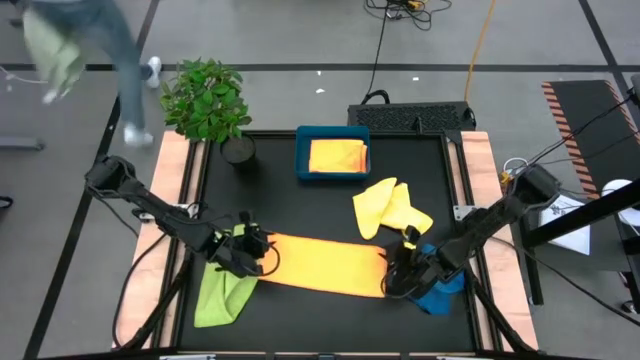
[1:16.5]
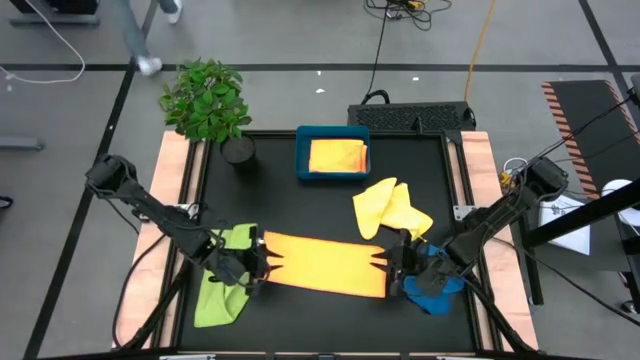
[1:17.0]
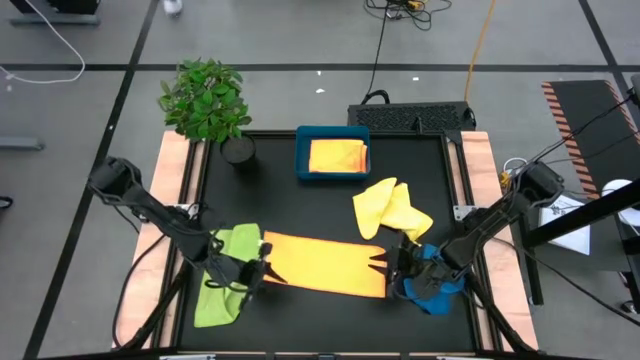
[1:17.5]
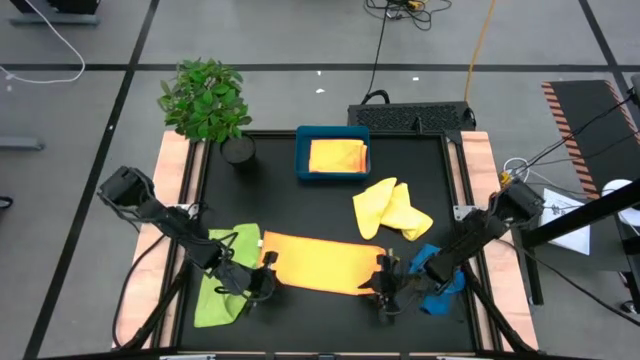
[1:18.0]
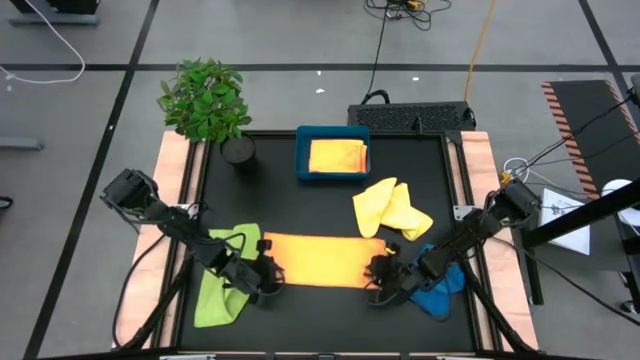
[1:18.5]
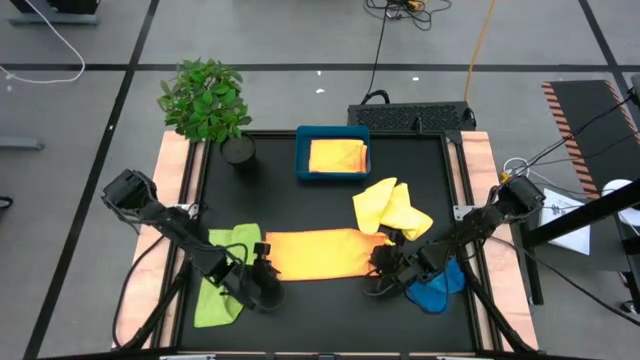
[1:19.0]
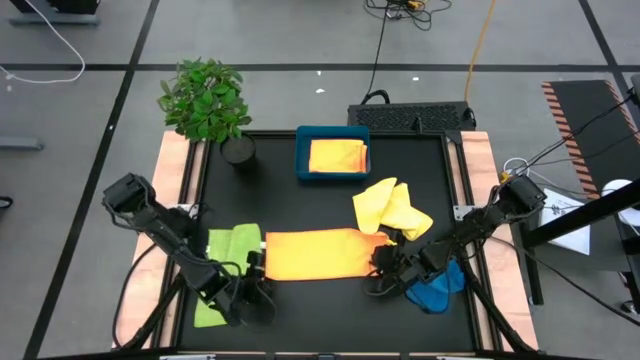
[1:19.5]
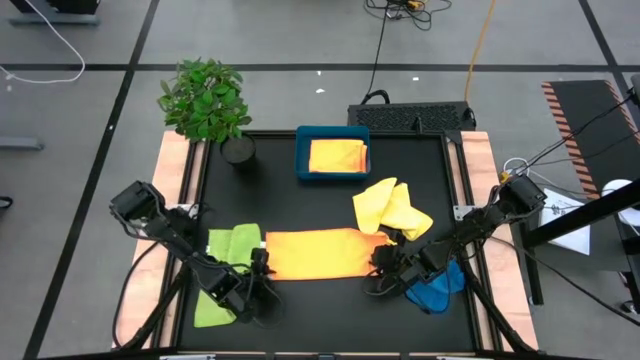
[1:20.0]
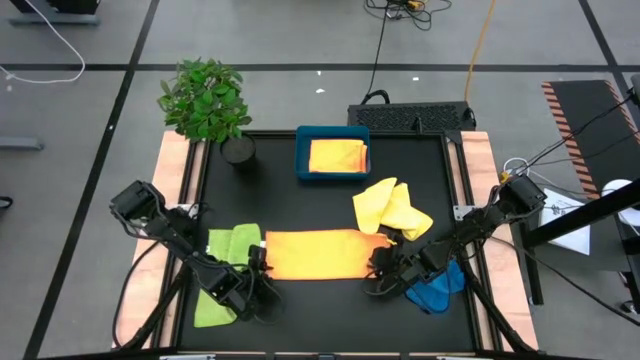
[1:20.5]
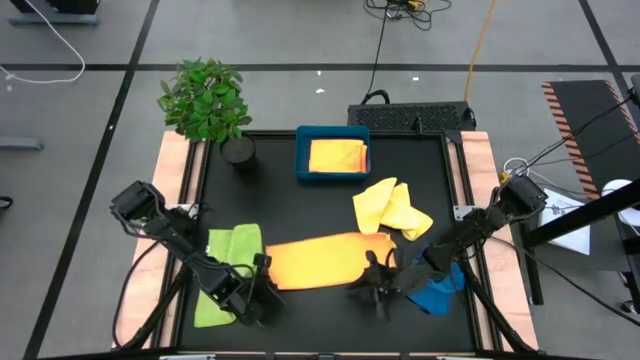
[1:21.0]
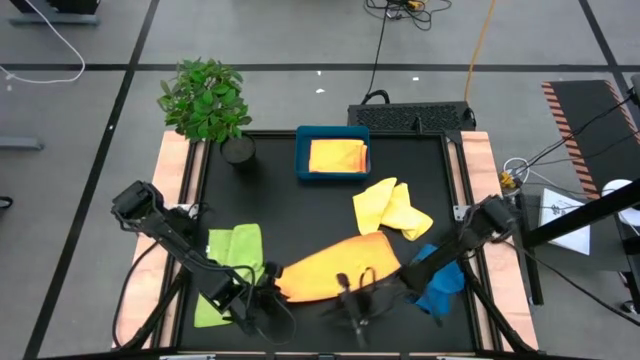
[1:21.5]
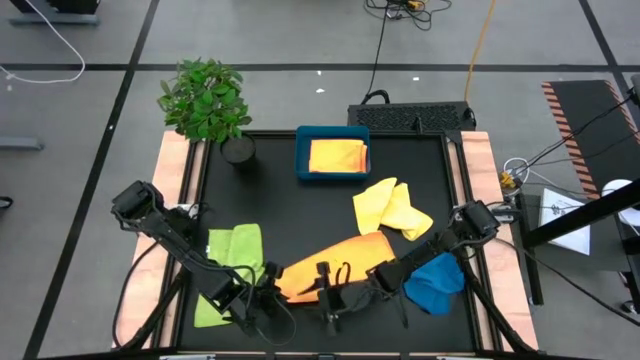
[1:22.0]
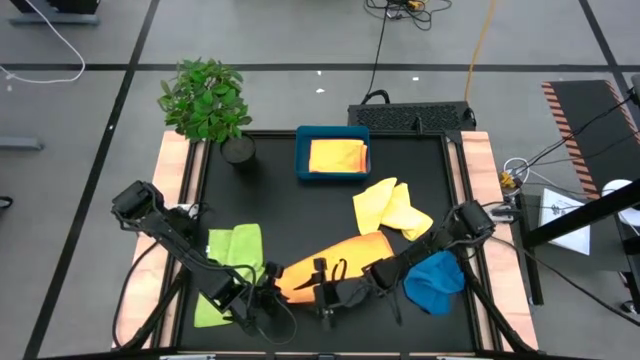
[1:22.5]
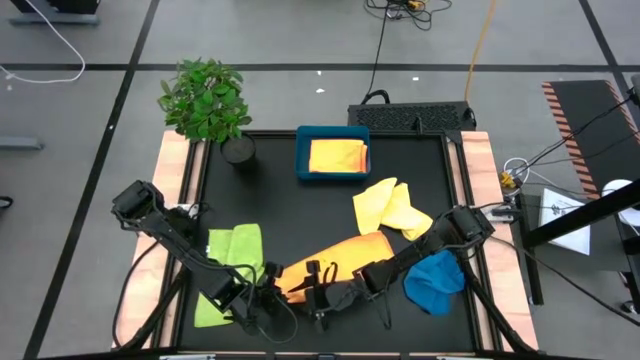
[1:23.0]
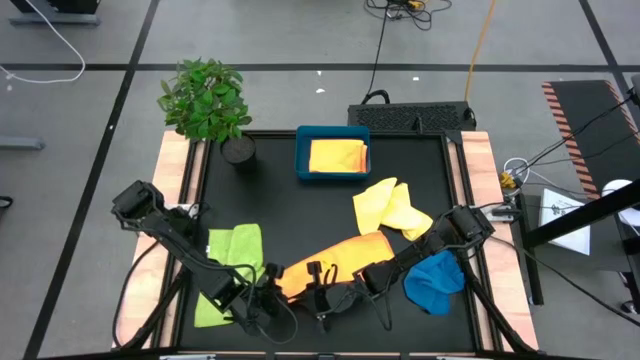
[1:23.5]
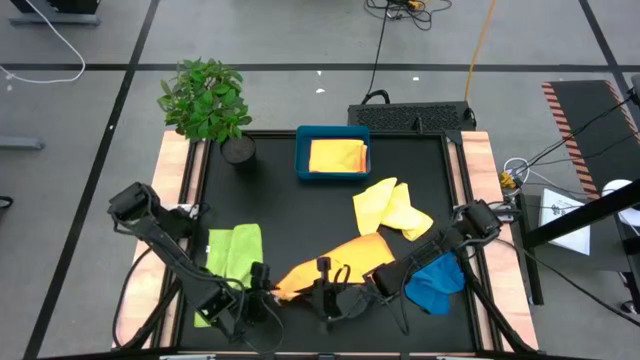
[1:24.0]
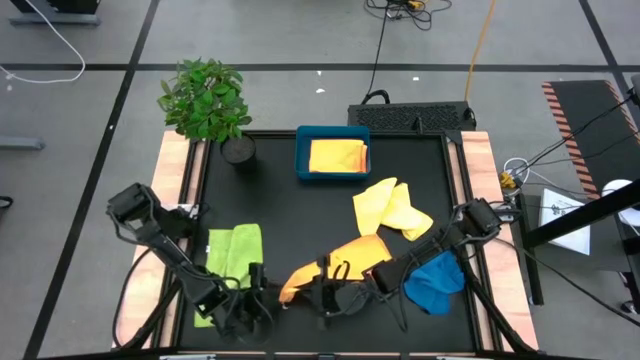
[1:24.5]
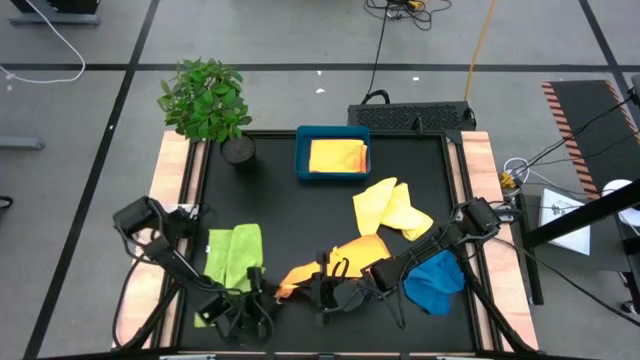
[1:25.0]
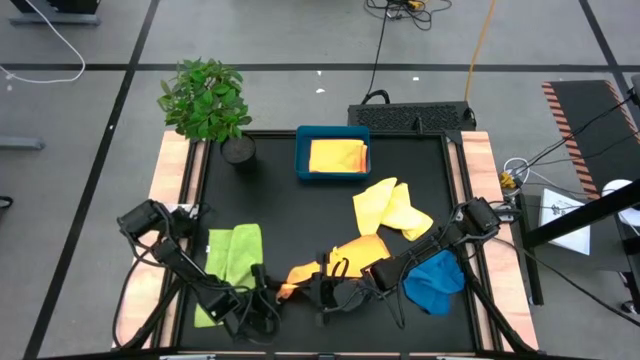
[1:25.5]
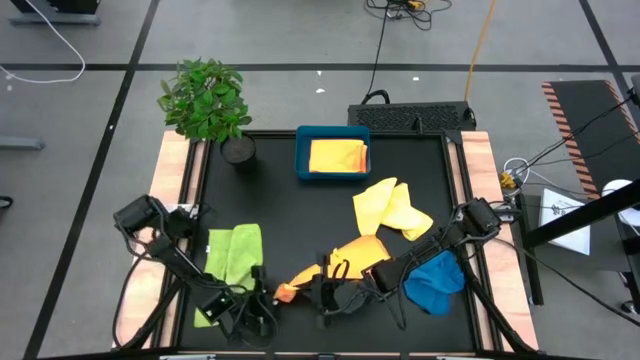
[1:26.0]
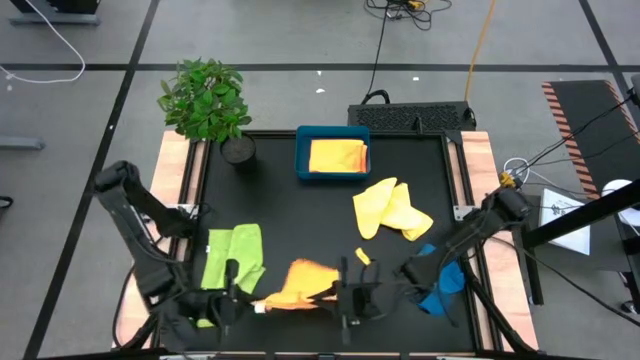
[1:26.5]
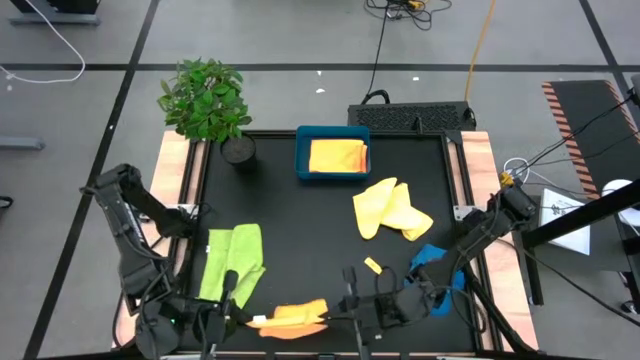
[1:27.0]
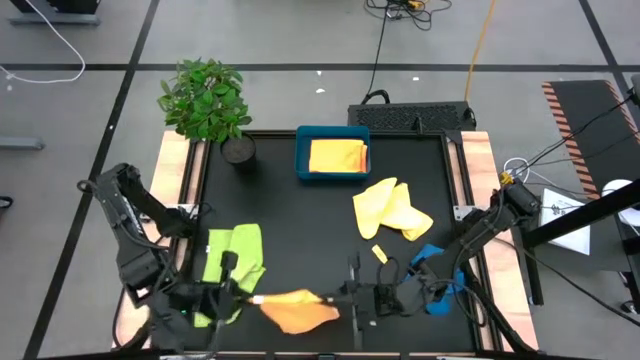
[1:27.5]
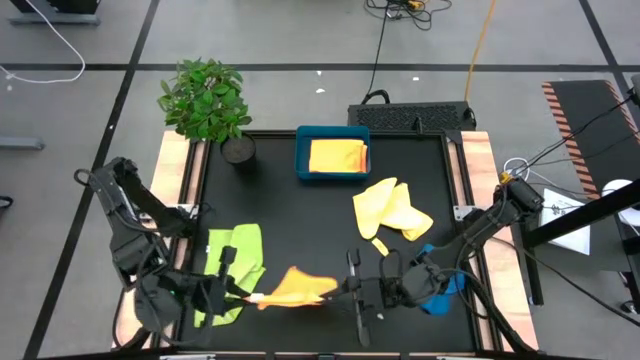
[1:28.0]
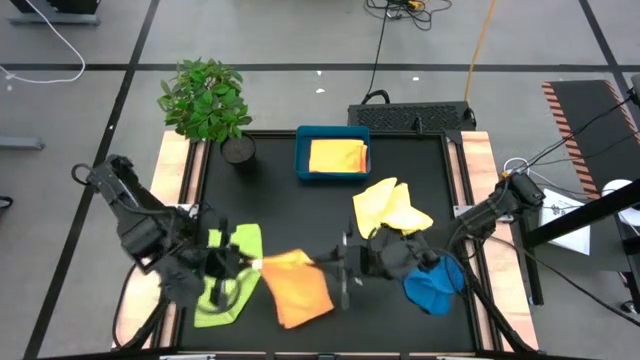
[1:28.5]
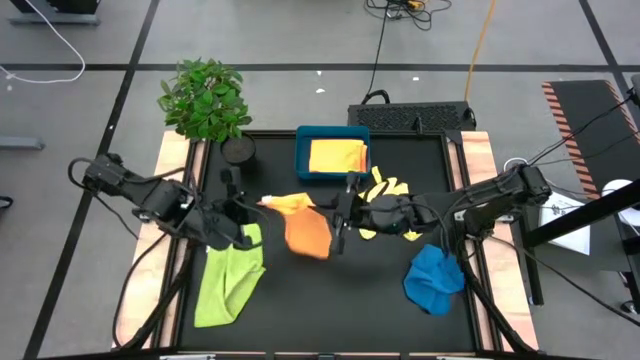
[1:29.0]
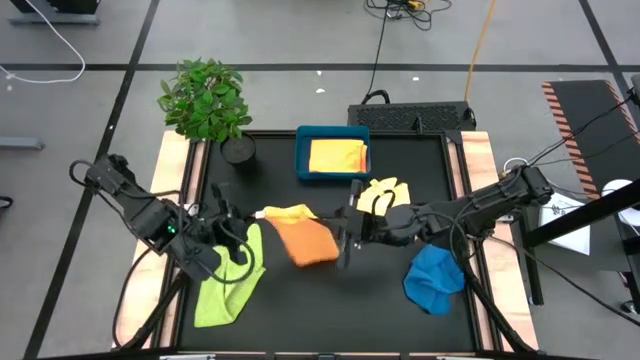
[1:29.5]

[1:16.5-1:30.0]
Task: Fold microfiber towels
Fold the orange microfiber towel

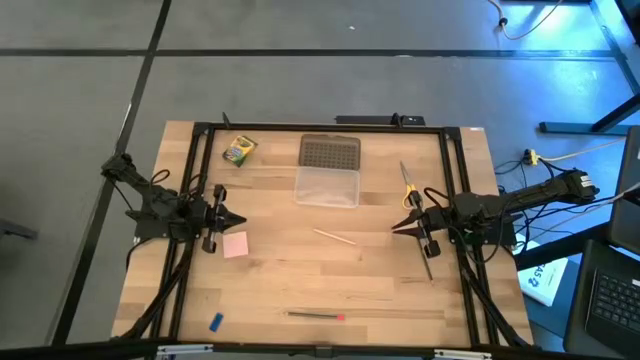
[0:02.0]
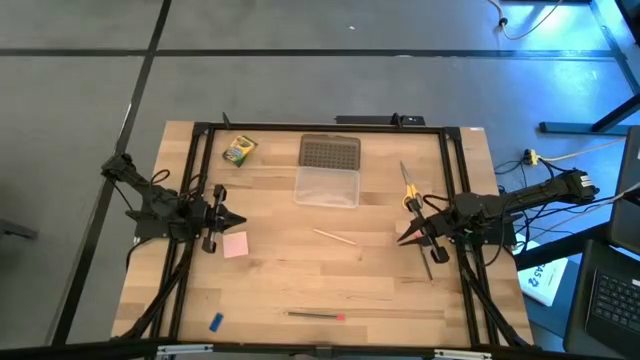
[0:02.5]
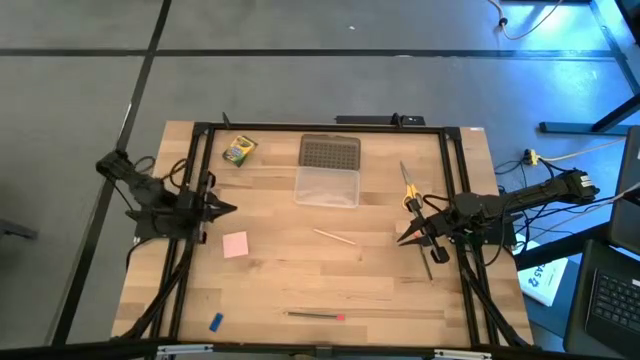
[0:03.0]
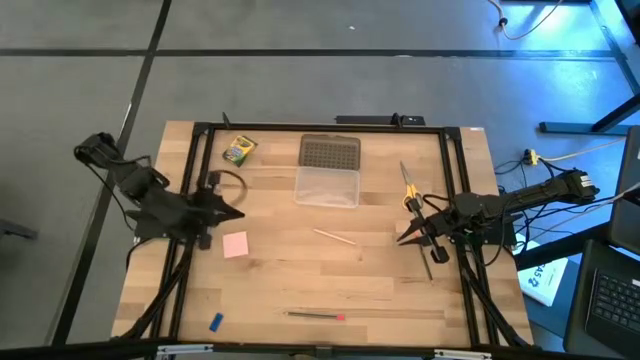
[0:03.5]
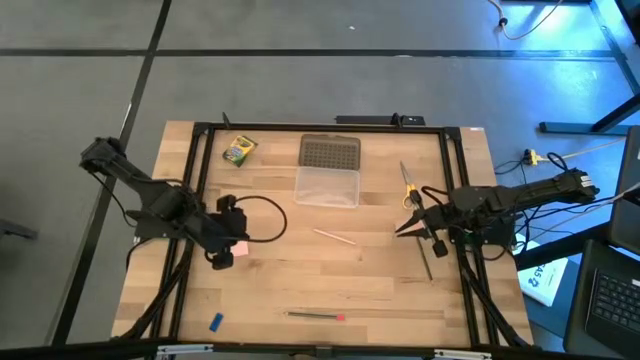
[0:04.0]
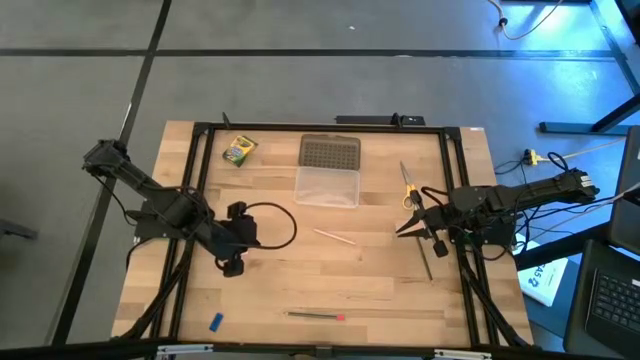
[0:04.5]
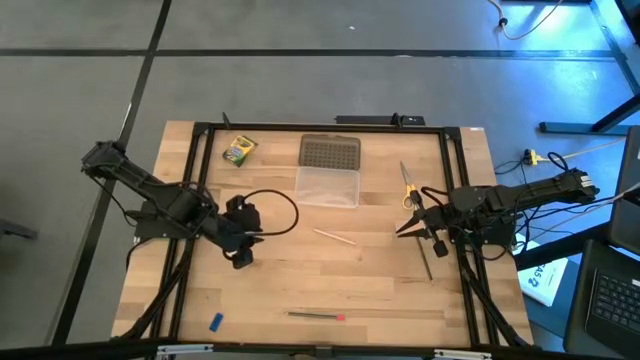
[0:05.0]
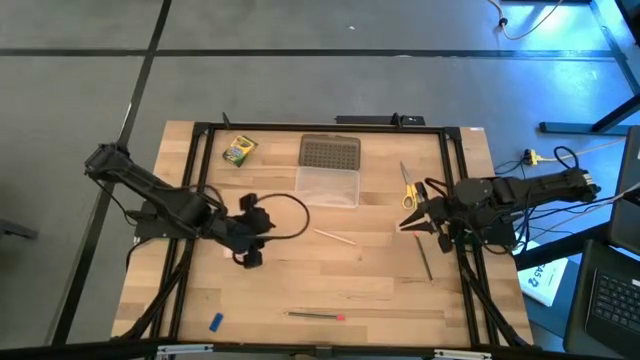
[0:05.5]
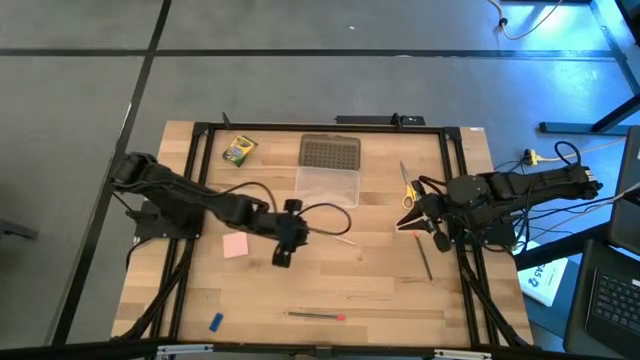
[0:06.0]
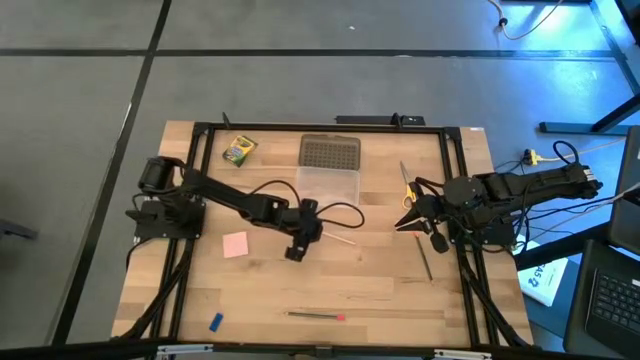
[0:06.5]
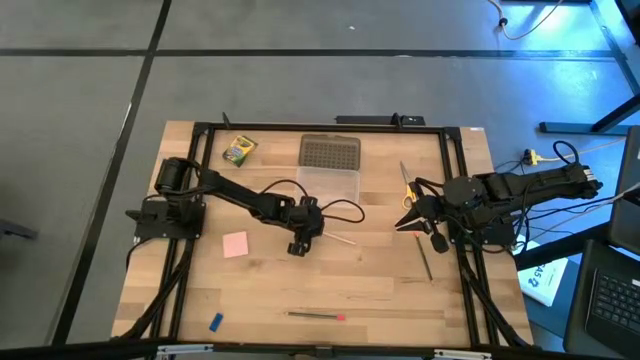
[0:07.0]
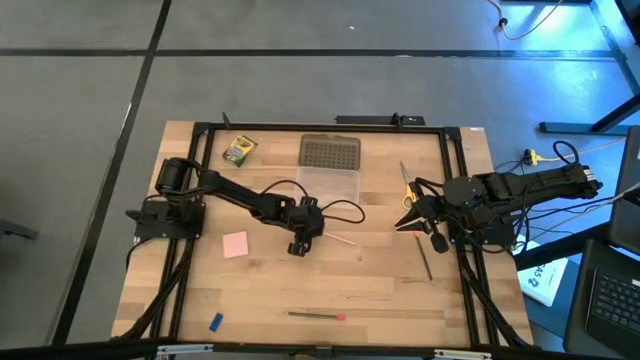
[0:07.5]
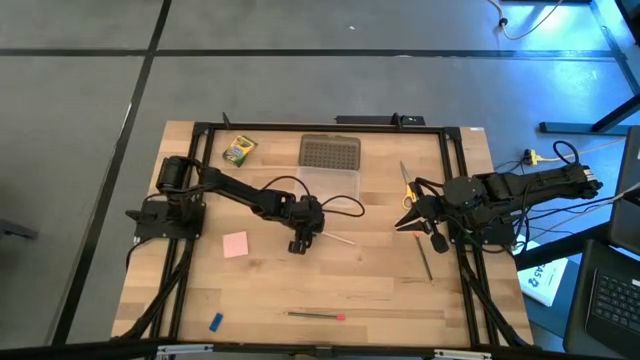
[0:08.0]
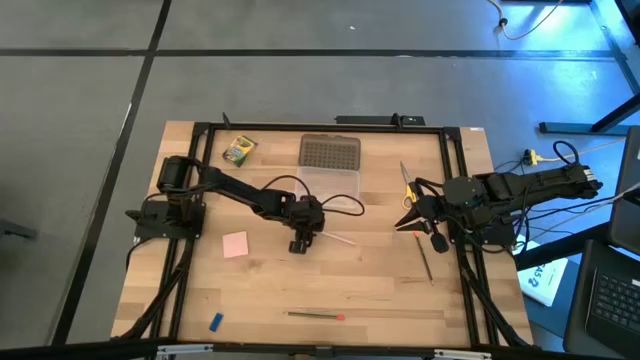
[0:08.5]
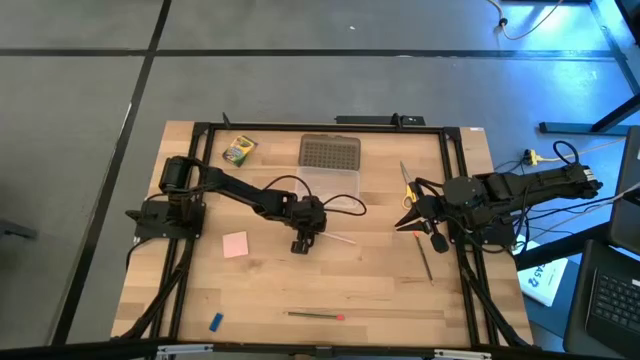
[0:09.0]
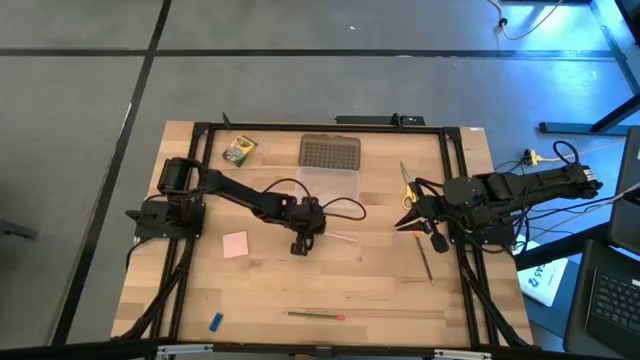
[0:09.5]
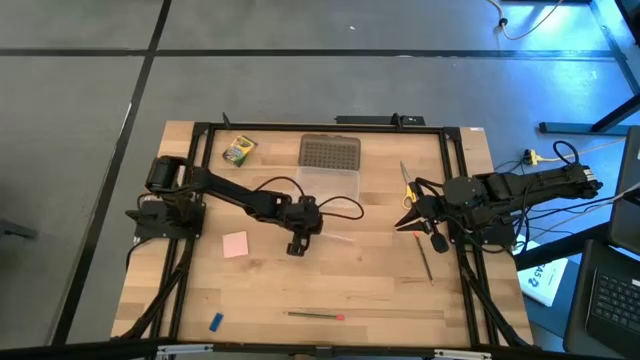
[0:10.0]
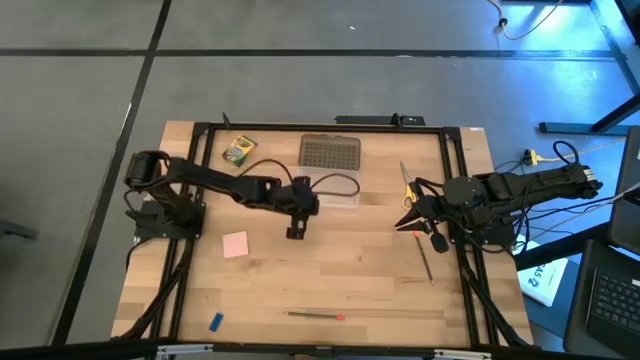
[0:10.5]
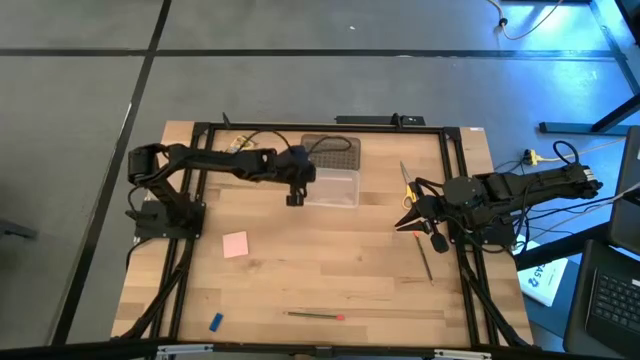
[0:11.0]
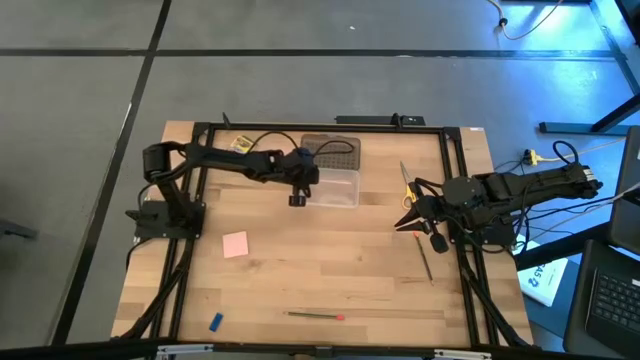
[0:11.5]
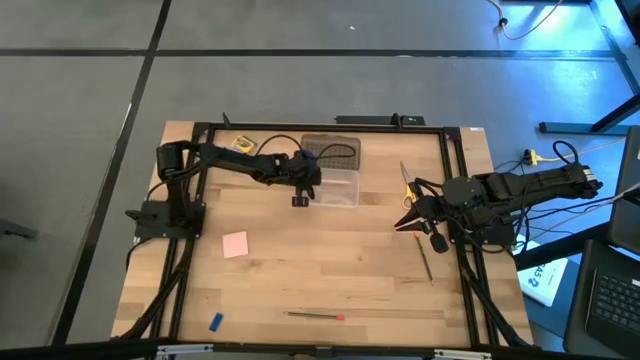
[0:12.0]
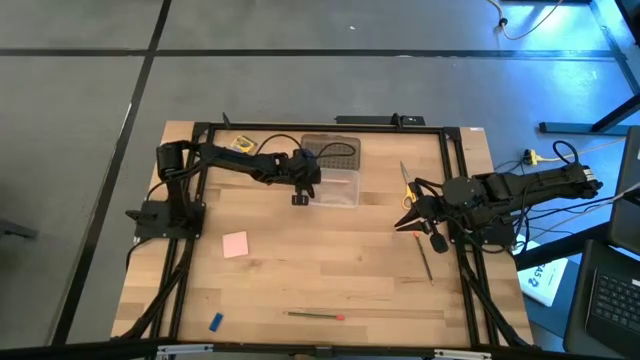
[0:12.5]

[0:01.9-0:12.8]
Task: Pack school essentials
Put the pink pen into the black supply box
